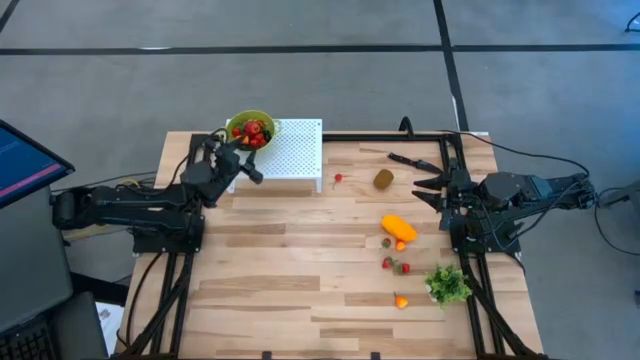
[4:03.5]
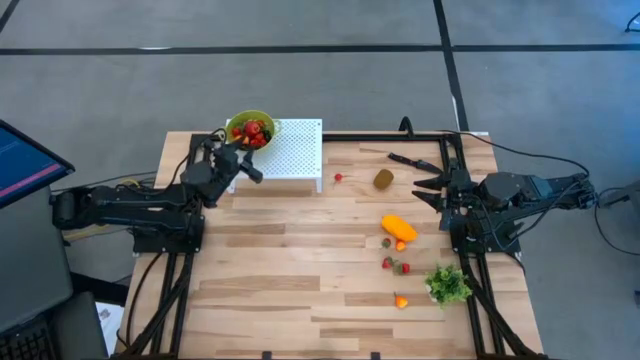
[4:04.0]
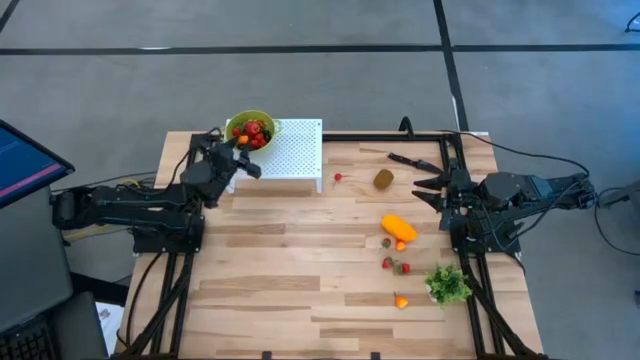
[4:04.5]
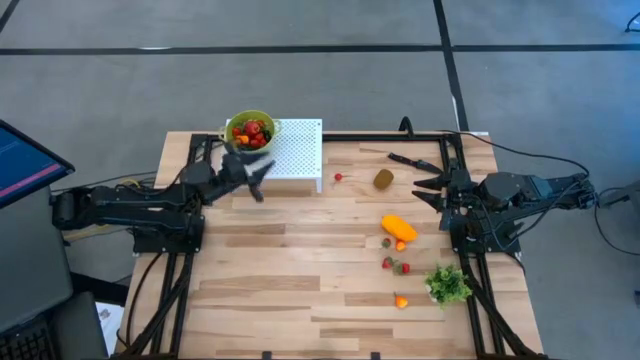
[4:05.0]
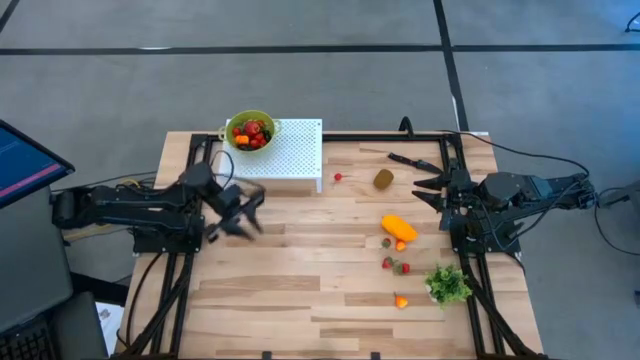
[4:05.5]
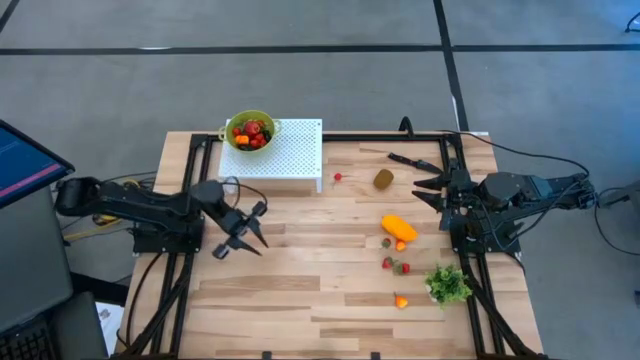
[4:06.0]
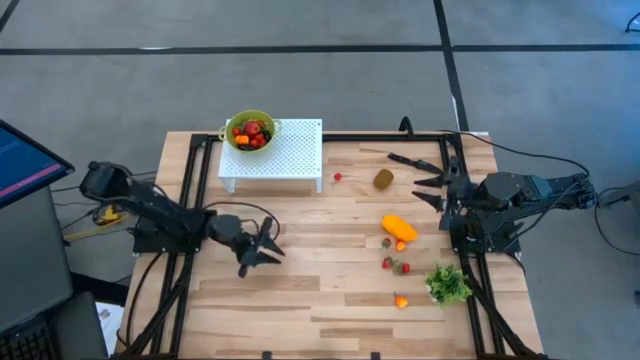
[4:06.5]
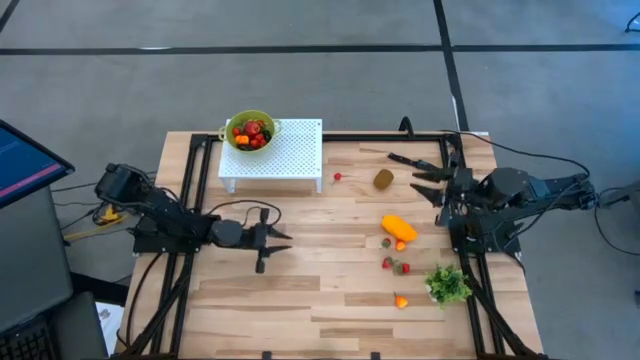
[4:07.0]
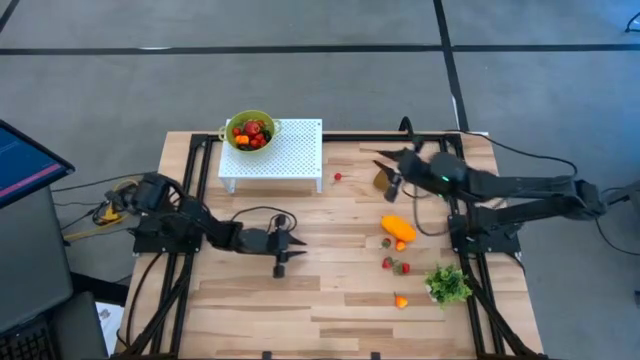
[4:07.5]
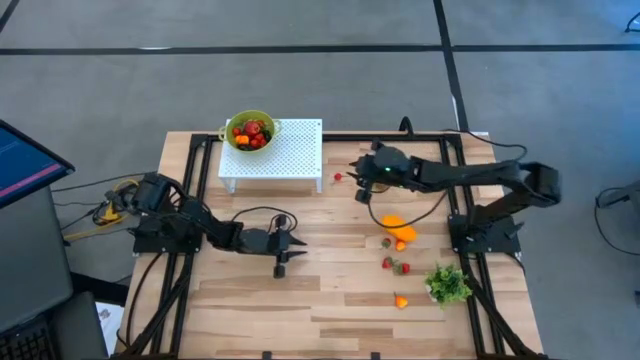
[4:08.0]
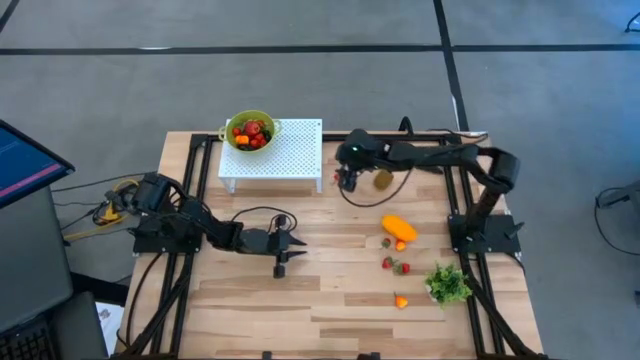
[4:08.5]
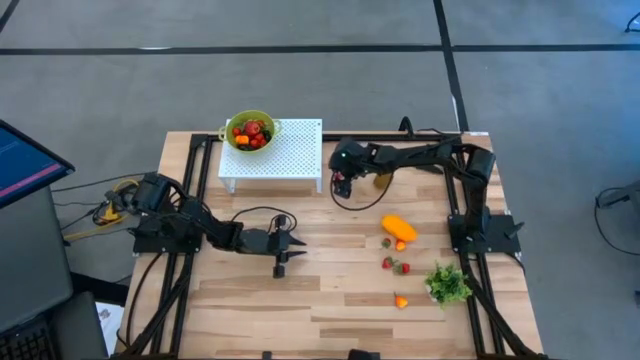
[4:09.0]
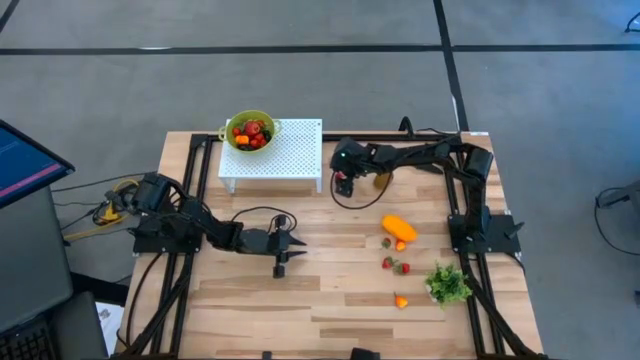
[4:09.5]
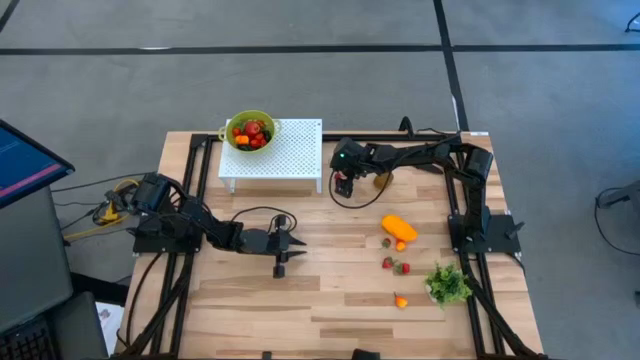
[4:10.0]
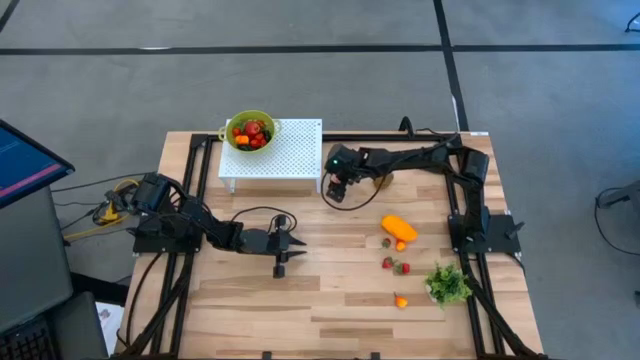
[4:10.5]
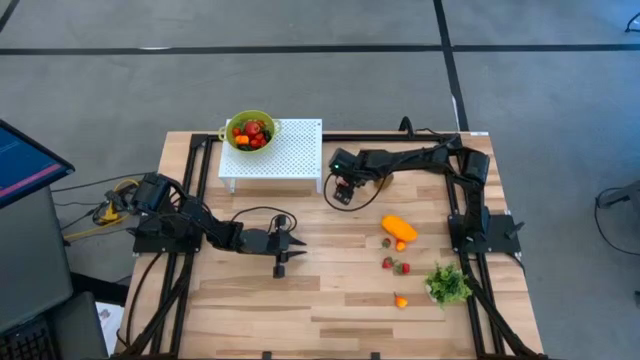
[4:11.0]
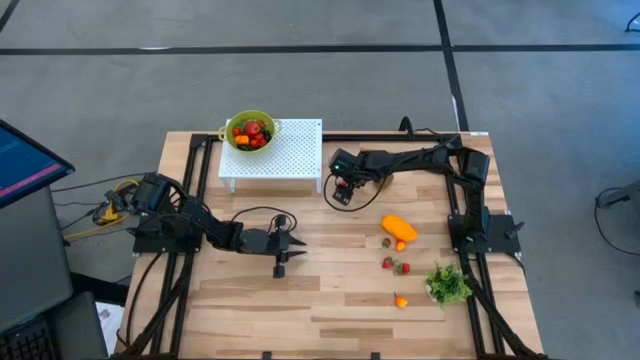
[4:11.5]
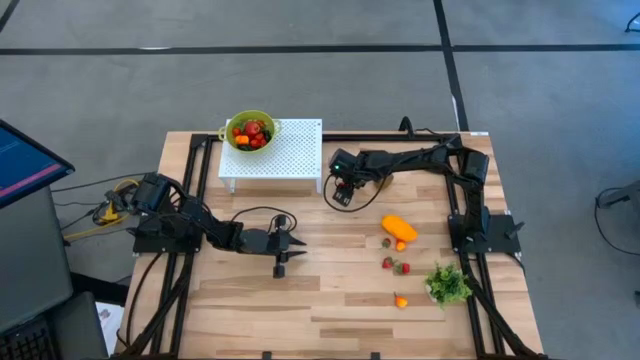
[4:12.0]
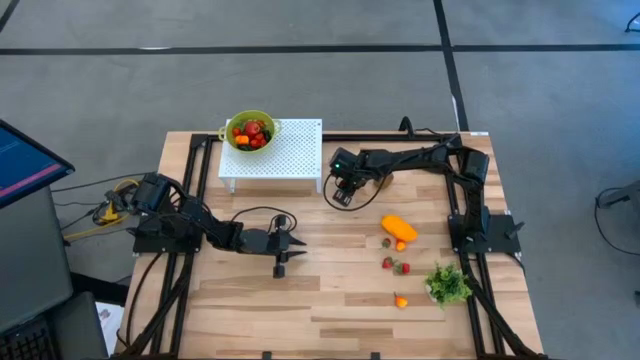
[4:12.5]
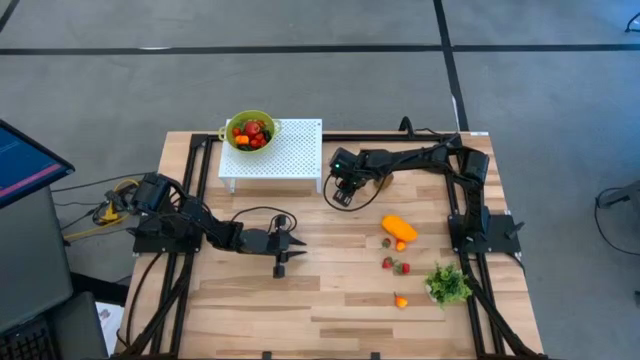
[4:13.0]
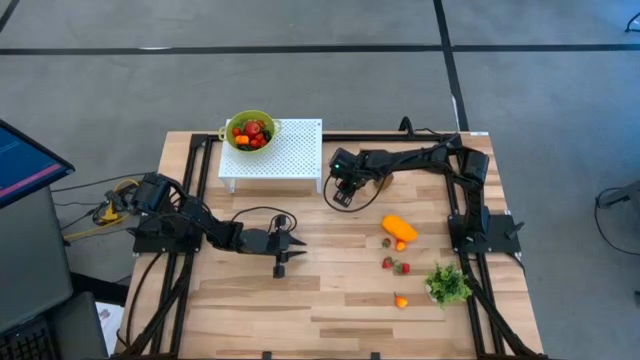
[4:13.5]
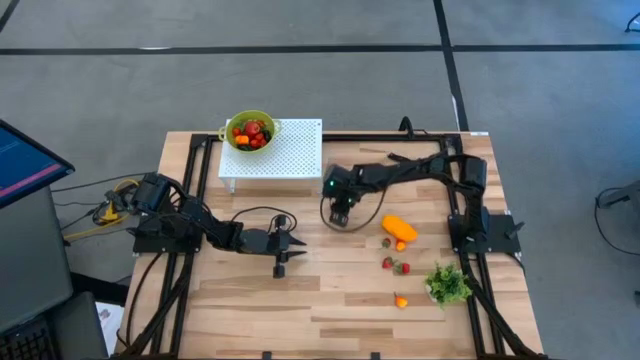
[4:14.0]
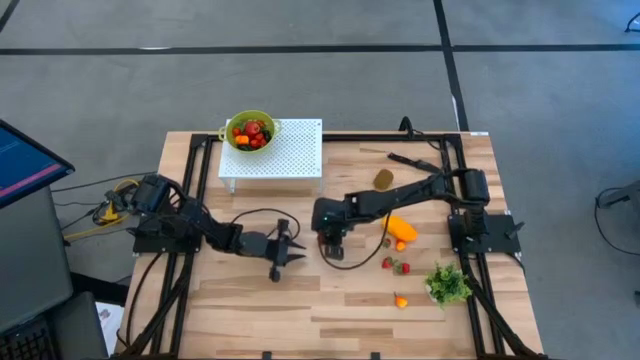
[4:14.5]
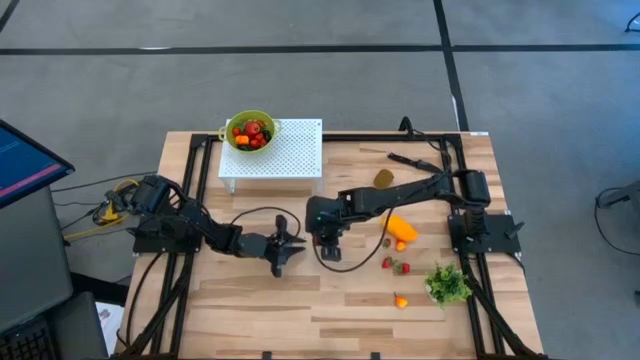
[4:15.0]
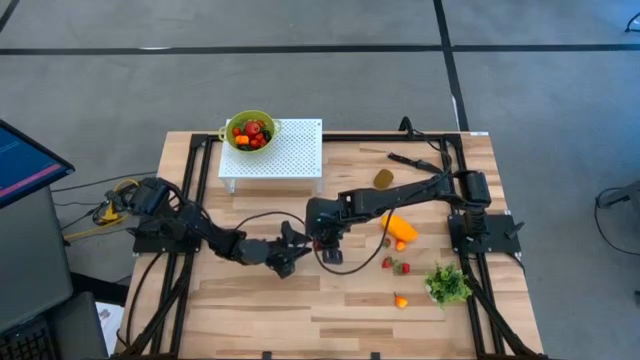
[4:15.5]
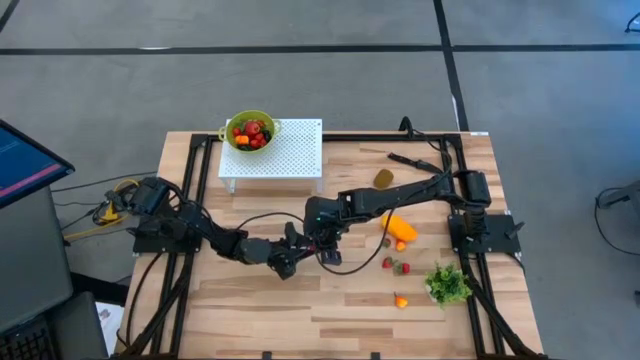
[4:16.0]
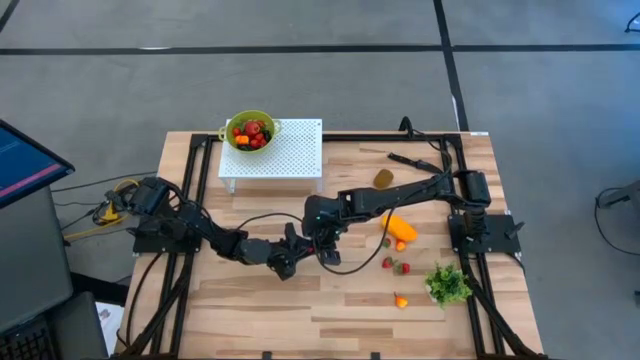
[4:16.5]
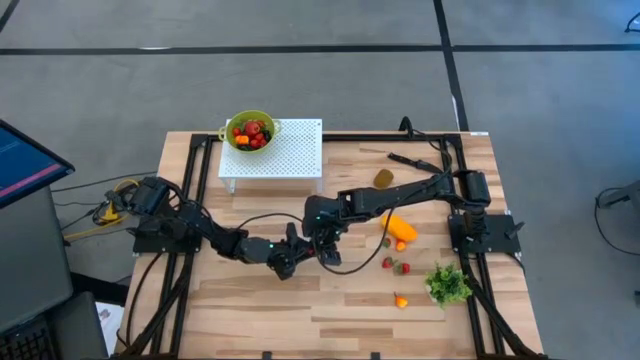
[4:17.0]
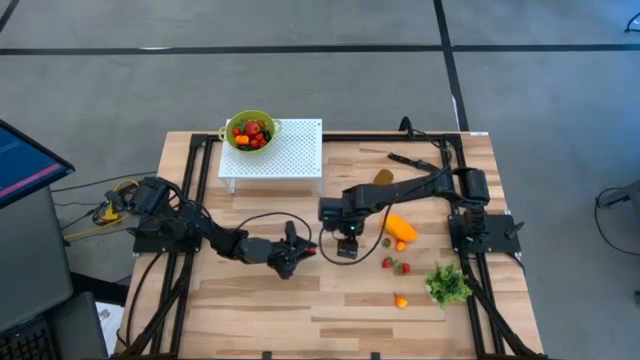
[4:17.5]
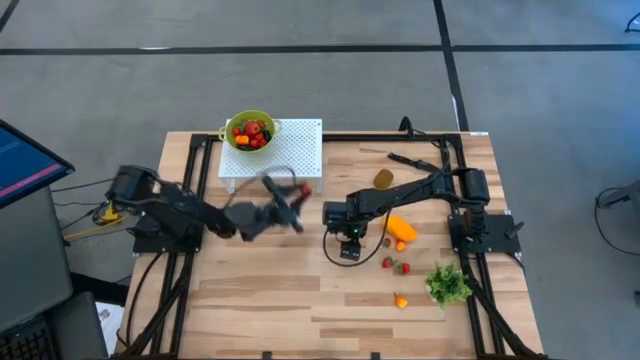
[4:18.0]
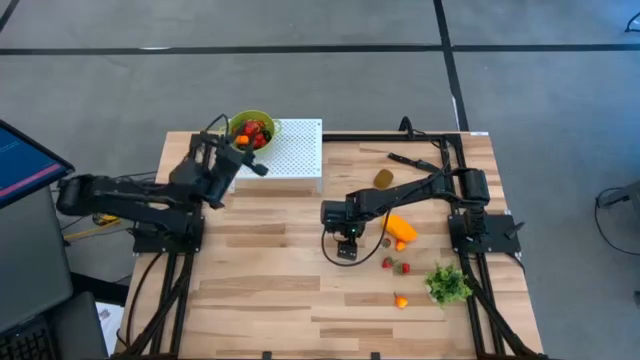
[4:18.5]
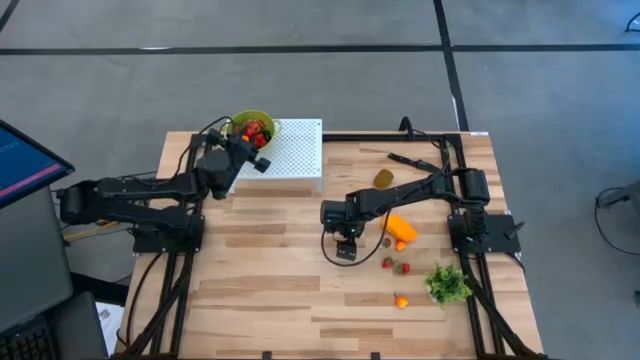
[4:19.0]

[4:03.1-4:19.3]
Task: Pick & Place Fruit
Put the red cherry into the green strainer bowl on the shelf

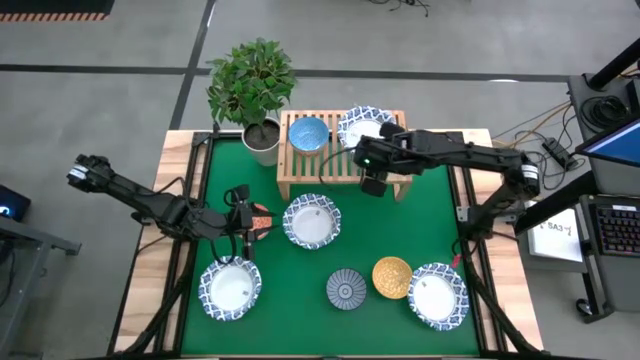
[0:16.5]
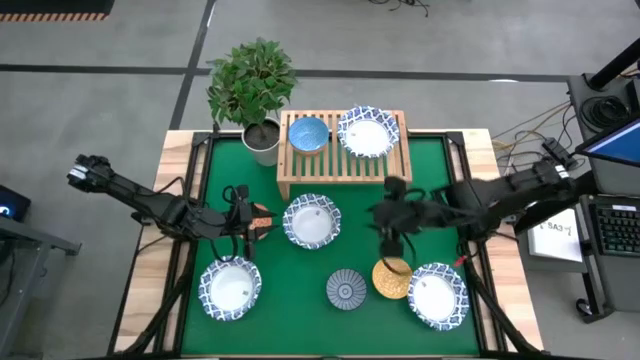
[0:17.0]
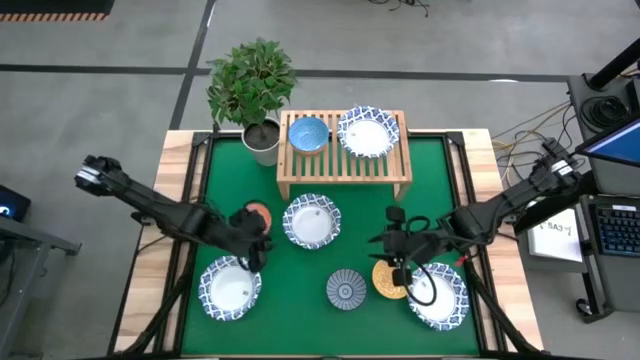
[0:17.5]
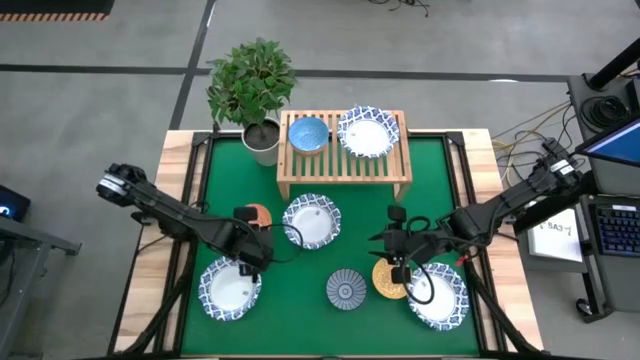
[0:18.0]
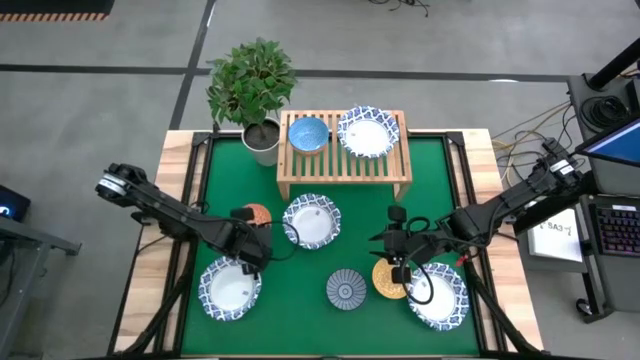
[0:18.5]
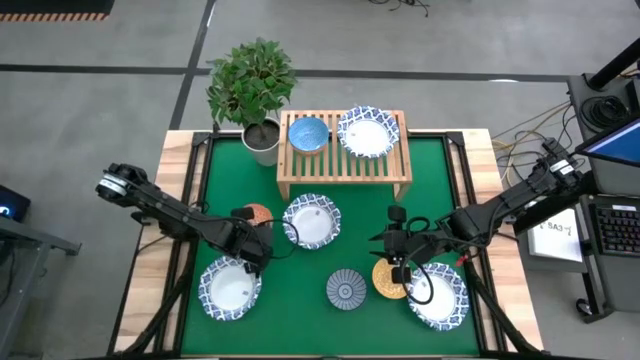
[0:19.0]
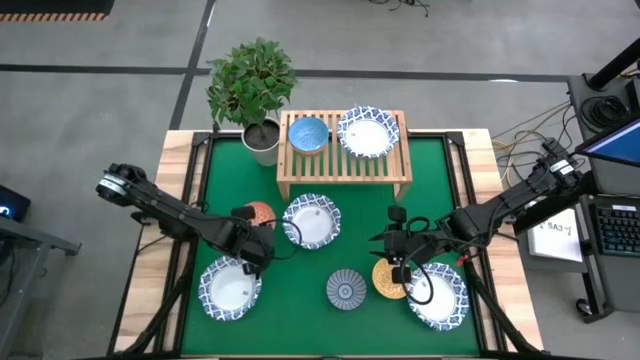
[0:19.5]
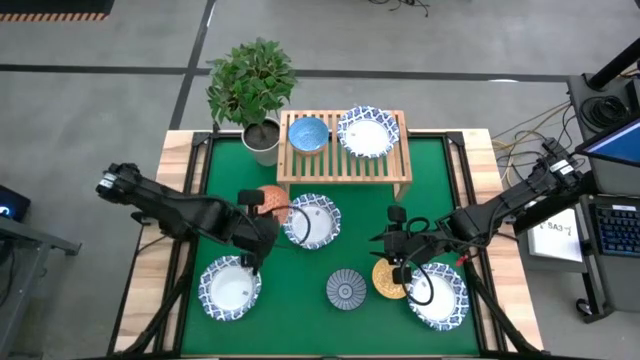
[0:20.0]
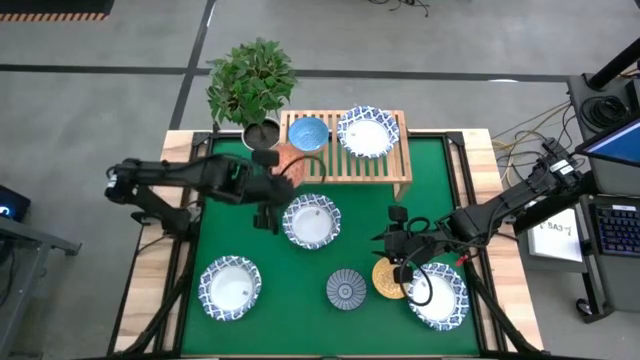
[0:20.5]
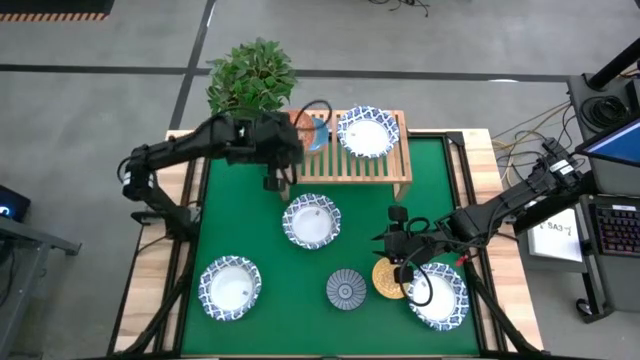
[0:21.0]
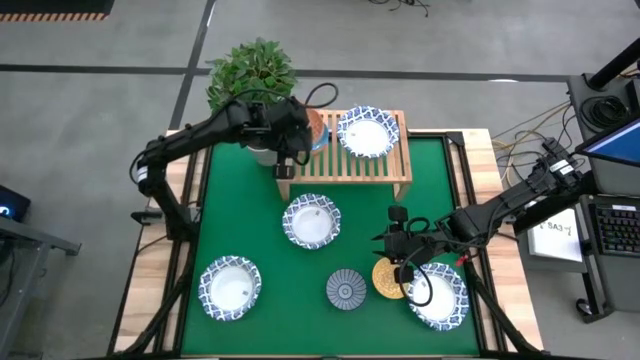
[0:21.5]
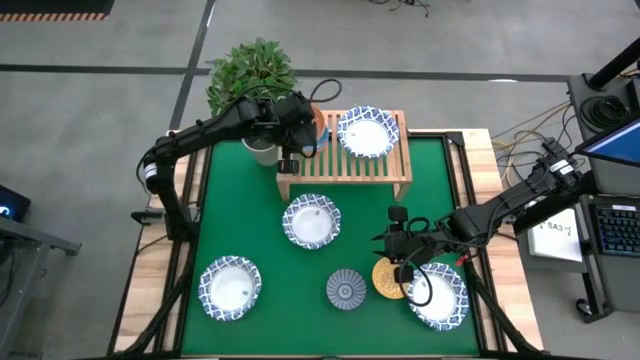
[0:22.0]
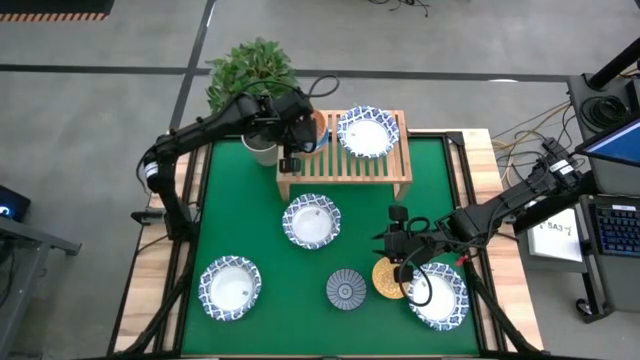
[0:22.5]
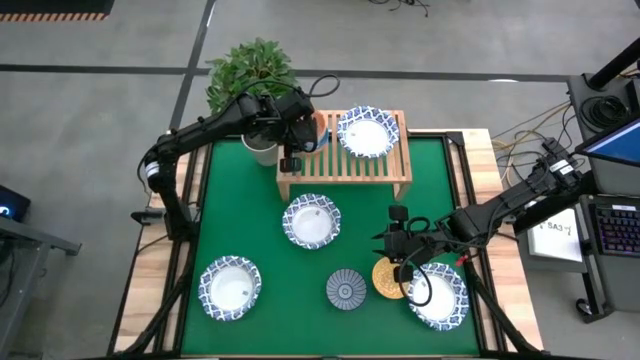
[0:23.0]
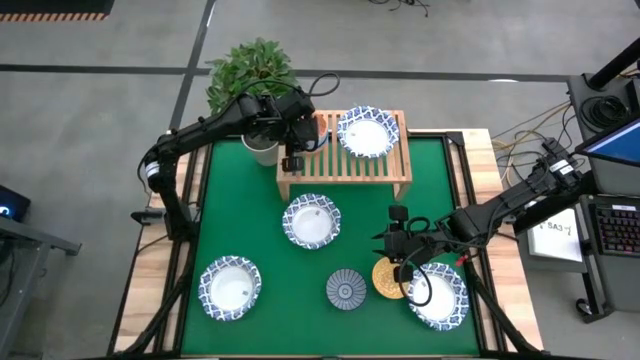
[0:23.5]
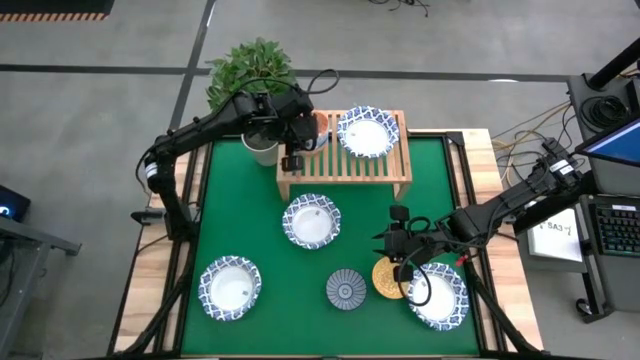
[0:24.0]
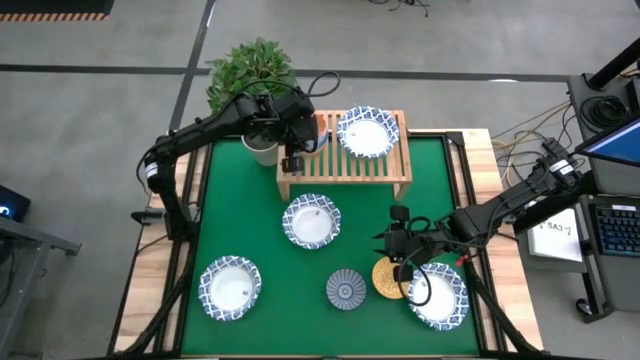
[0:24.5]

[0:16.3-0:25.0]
Task: Place and stack bowls onto a shelf
Stack the orange patterned bowl on top of the light blue patterned bowl on the shelf
